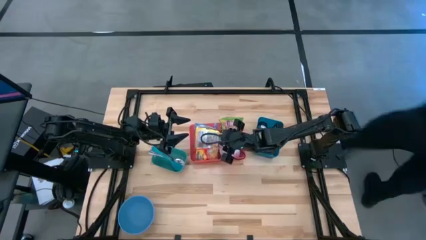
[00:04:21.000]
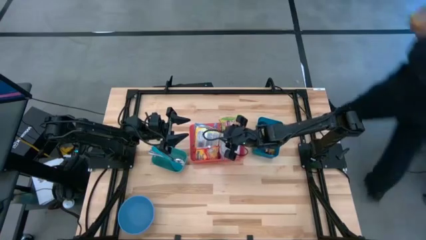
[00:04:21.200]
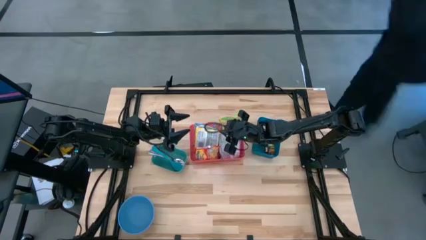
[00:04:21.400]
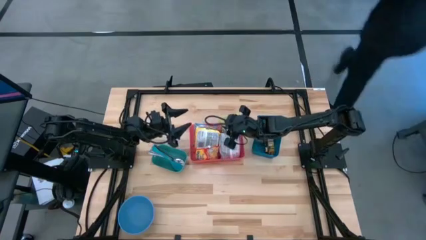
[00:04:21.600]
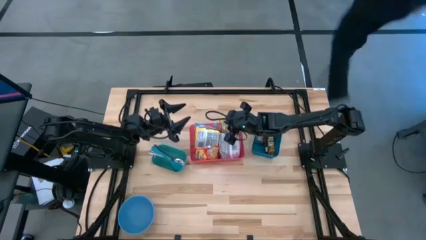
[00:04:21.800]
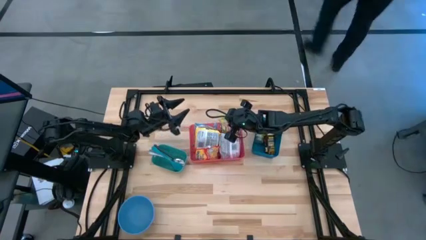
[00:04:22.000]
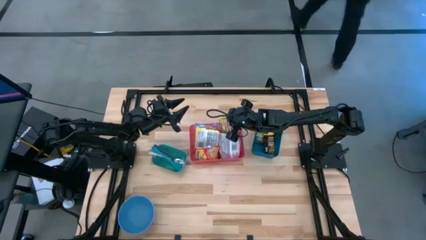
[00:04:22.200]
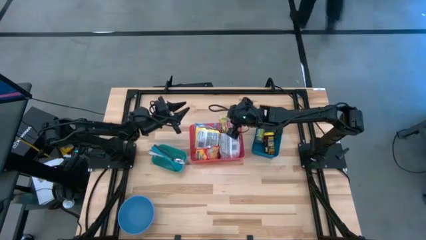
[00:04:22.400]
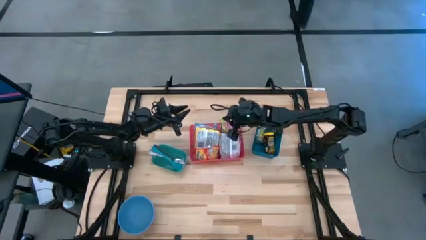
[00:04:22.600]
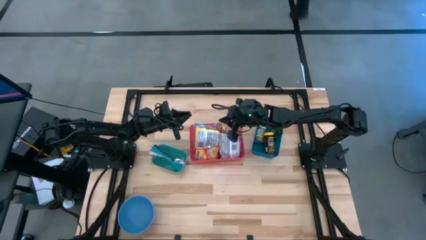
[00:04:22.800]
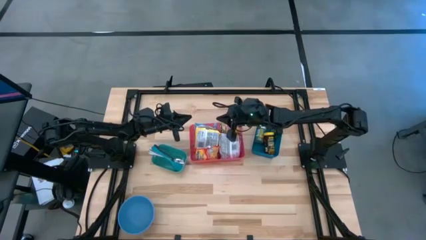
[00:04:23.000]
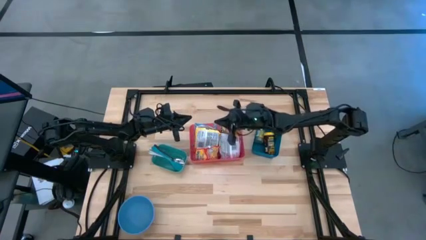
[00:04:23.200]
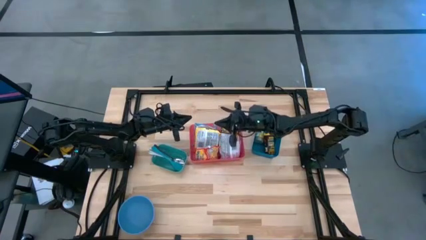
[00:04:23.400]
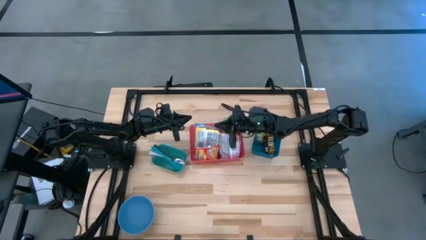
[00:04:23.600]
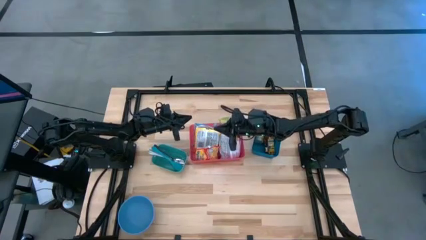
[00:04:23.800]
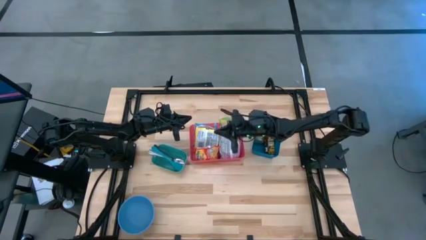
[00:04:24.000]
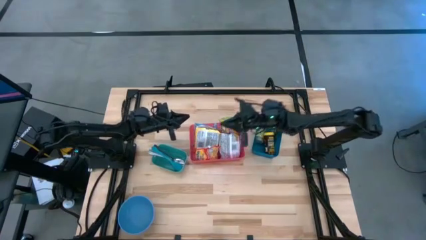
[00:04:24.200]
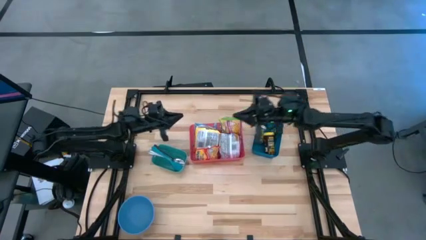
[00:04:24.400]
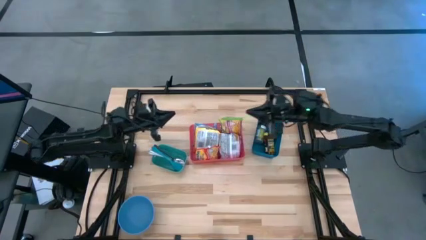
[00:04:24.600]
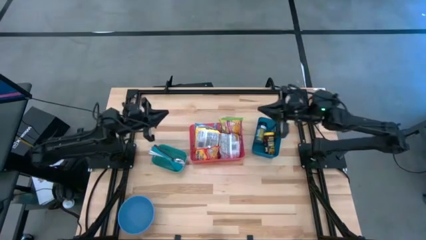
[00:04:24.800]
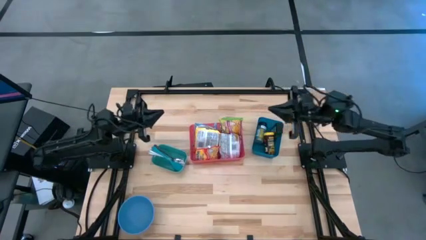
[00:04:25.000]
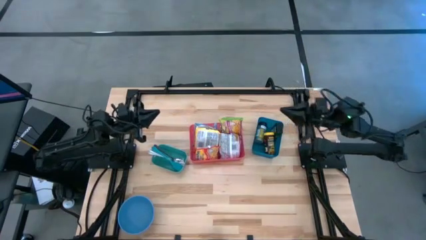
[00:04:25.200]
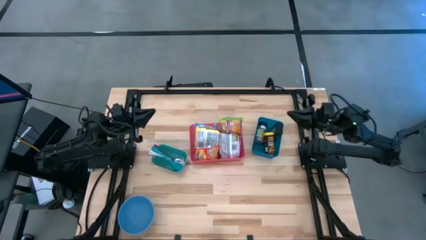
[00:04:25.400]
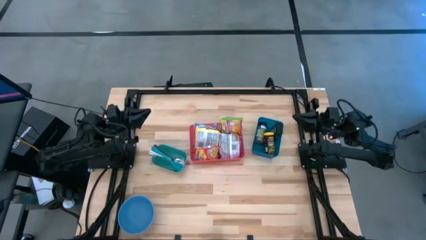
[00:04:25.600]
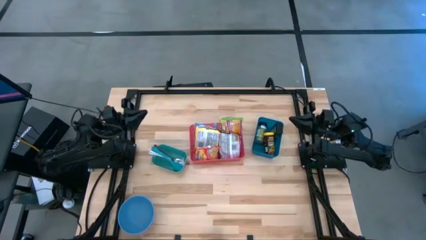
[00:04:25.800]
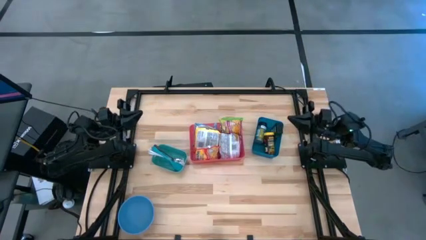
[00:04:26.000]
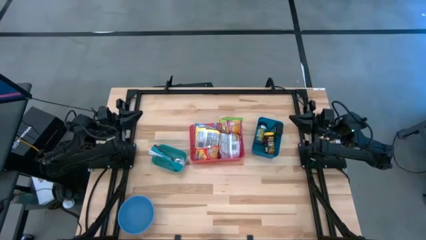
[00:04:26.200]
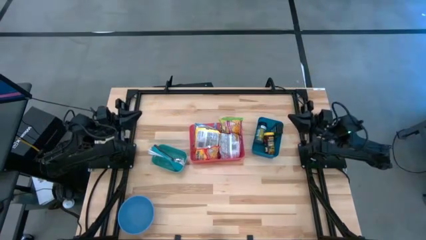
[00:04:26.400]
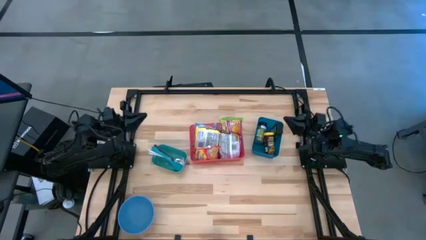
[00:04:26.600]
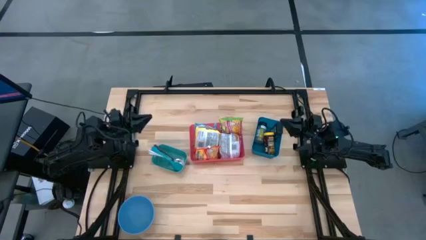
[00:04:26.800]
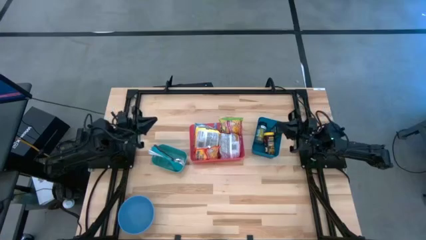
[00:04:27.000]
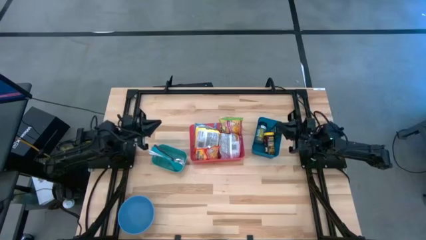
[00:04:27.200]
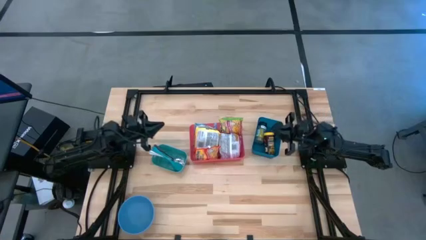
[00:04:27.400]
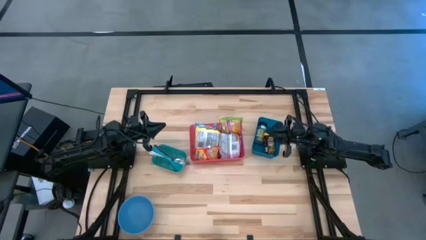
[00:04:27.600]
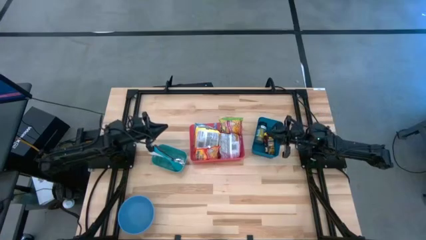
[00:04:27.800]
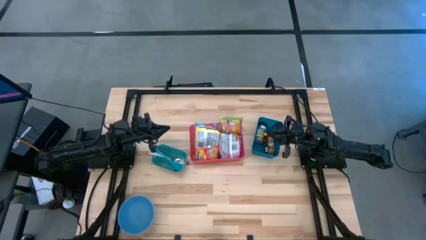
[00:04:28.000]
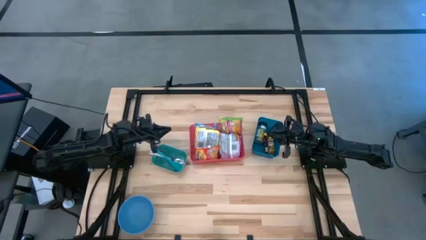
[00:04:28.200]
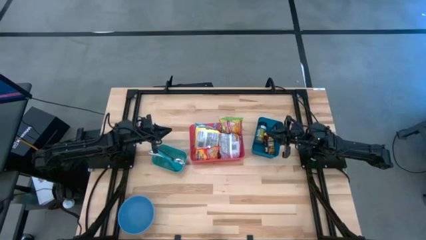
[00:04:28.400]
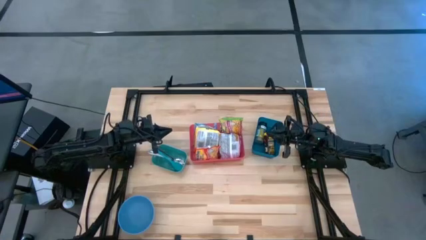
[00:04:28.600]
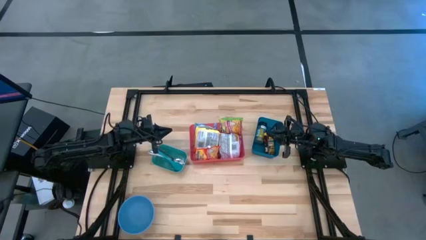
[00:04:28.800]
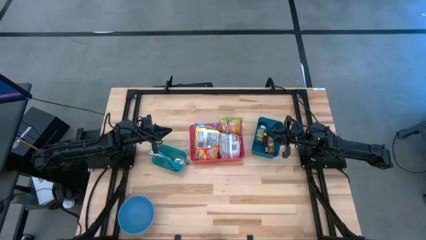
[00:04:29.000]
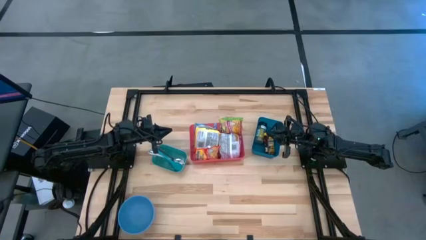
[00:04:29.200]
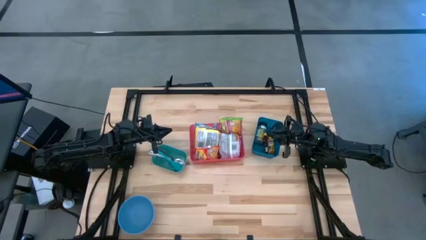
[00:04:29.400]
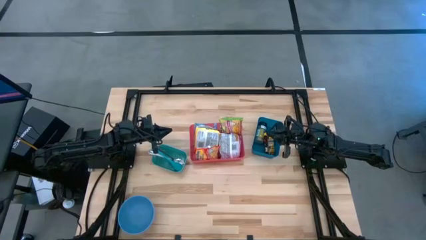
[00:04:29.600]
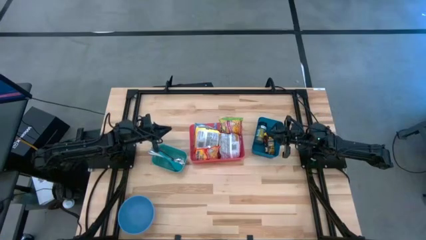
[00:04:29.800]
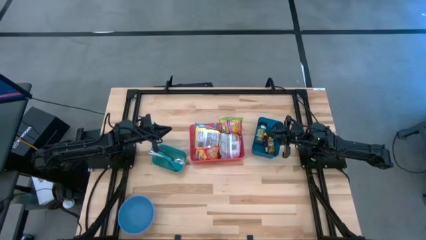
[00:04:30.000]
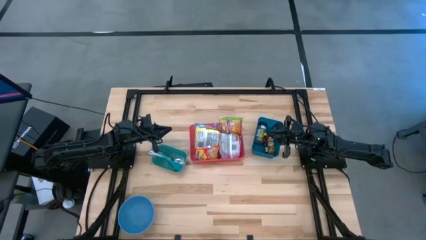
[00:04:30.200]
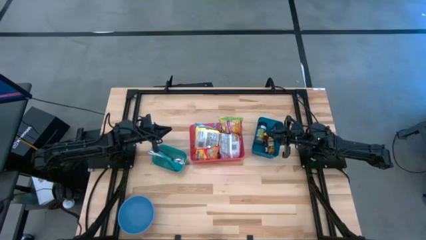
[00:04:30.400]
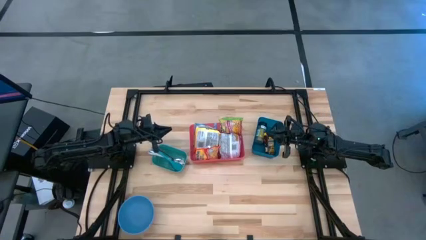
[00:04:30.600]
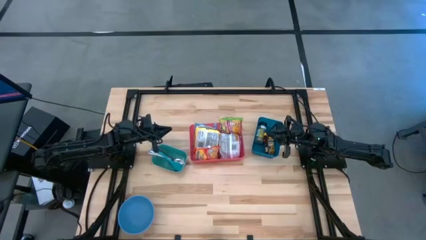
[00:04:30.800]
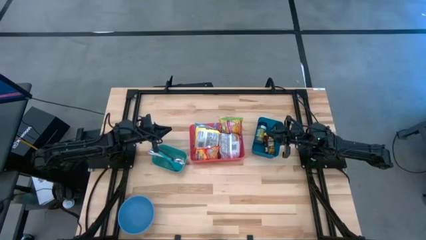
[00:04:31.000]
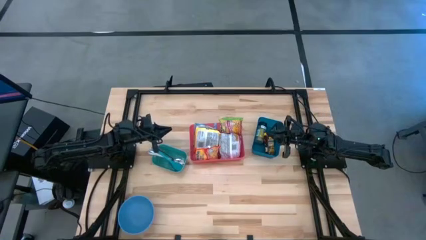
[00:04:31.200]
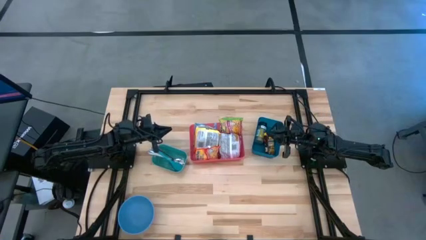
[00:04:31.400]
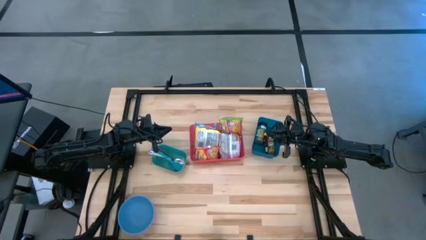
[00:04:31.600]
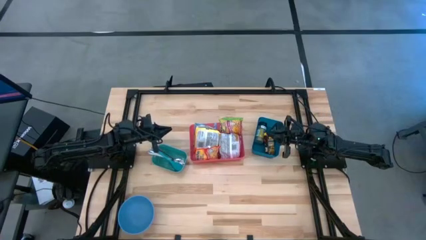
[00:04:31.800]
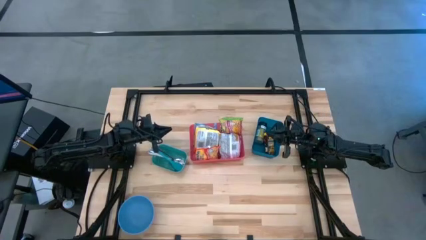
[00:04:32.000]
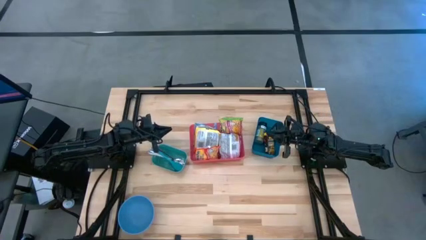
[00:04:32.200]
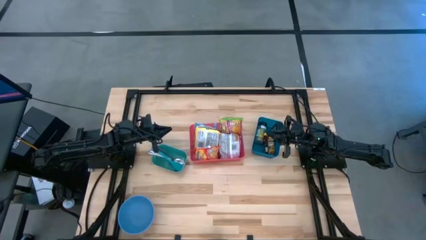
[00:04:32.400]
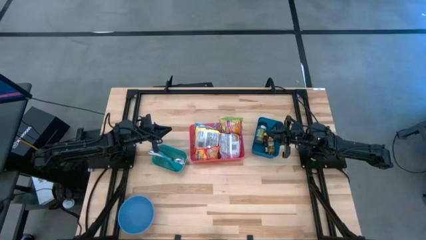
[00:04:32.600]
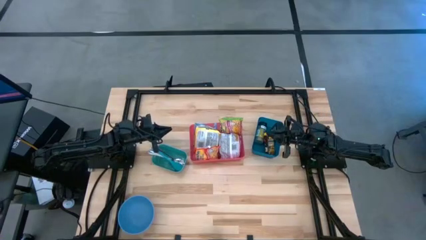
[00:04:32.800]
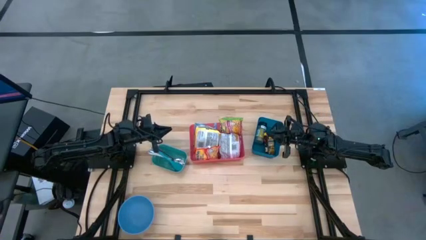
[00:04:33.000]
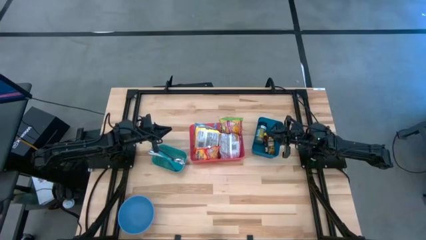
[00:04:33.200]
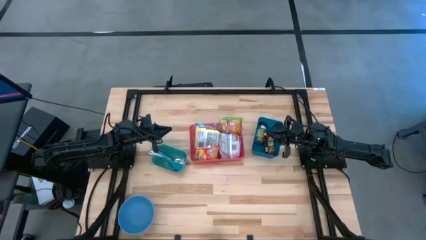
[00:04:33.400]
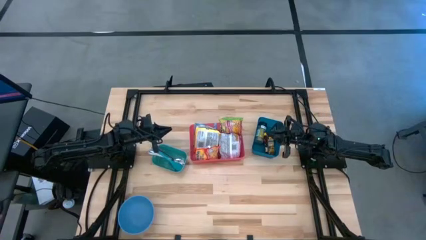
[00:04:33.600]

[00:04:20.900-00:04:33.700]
Task: Pick & Place Food Item
Return to Home Position

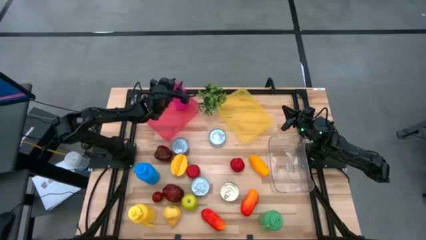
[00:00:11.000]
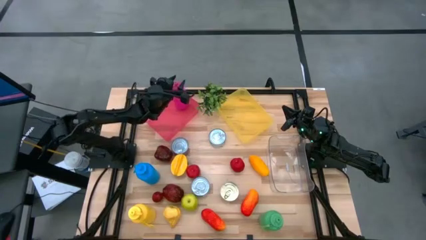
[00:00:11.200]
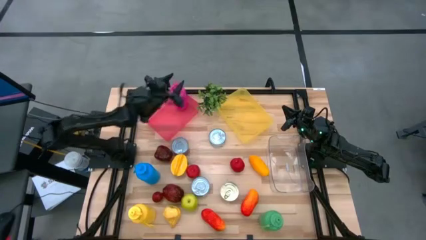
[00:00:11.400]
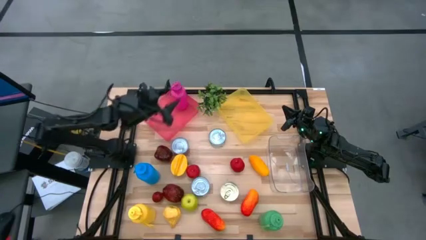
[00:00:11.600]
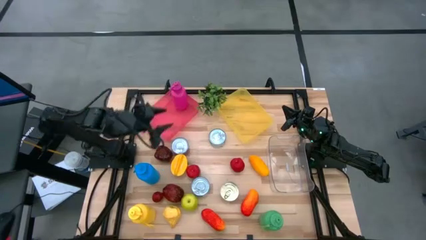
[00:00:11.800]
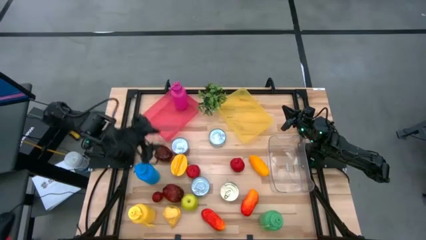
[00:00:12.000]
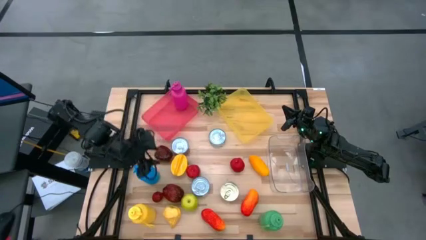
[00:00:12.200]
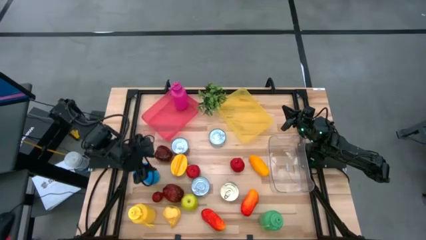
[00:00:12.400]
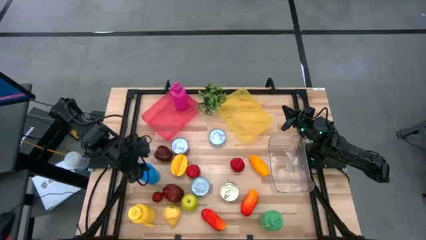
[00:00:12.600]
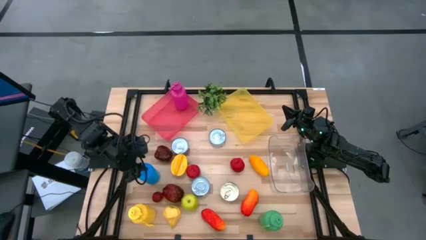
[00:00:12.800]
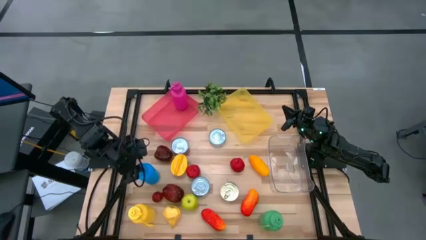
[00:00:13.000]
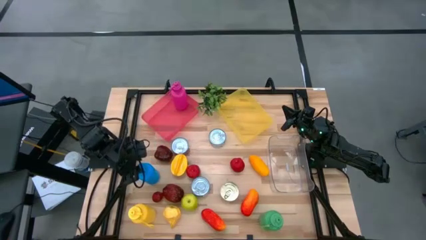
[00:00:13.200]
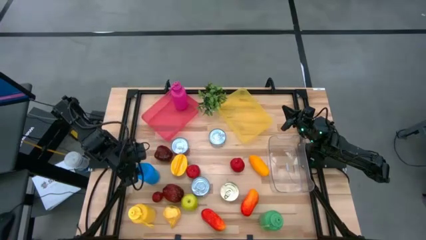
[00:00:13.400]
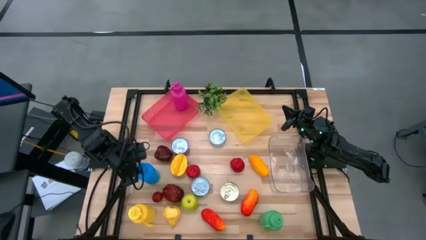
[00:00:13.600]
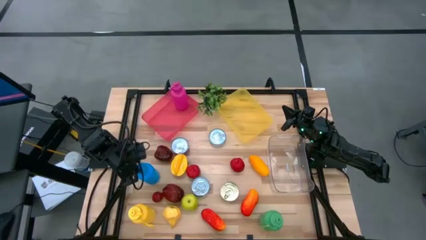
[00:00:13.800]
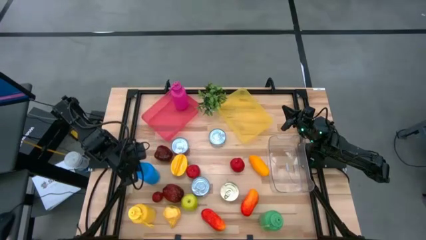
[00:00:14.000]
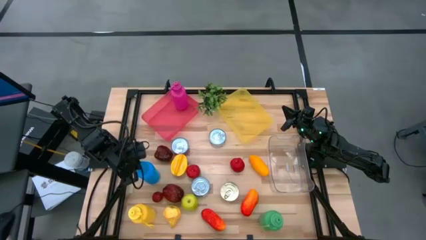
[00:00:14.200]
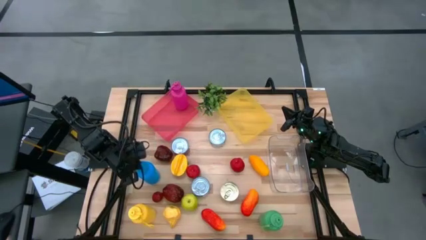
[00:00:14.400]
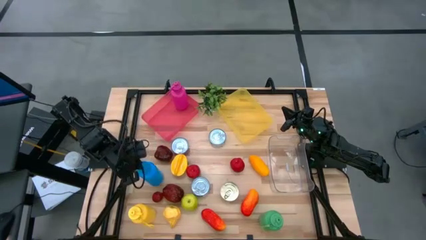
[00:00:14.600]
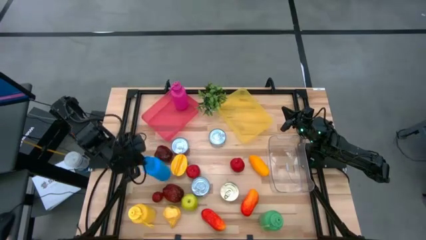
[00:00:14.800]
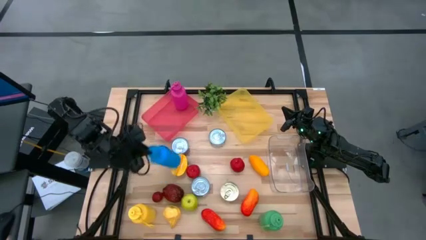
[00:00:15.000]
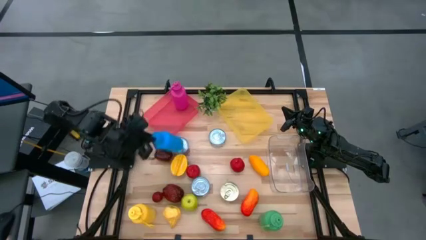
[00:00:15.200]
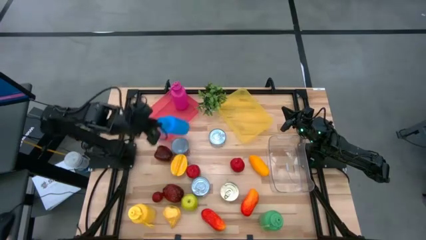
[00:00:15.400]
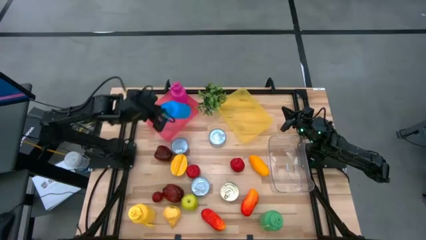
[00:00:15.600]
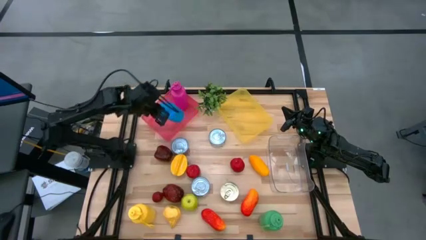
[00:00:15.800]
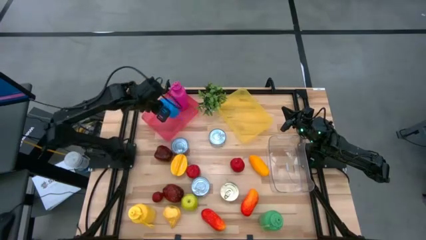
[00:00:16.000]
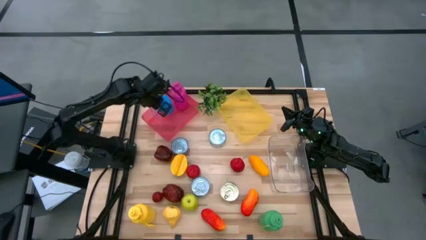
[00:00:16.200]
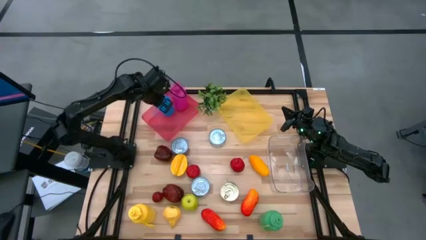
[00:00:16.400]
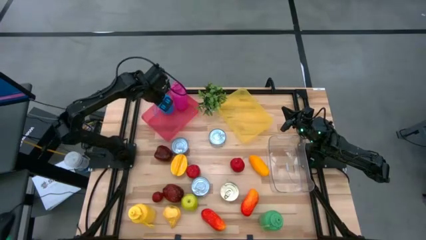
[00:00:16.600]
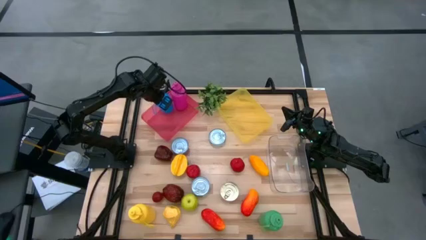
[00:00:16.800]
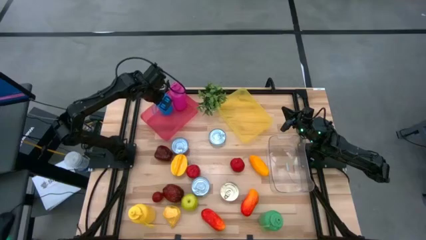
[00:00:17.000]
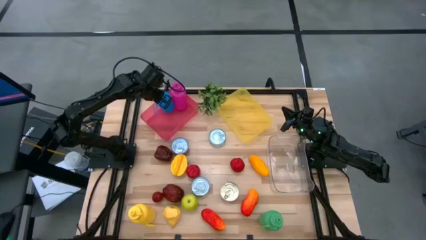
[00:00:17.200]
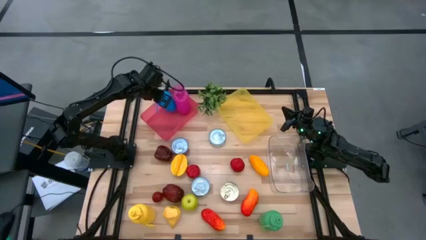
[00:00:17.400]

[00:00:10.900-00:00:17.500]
Task: Pick & Place Food Item
Put the blue water bottle into the pink bin
